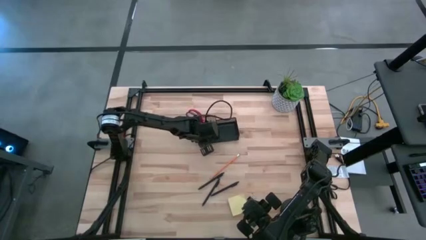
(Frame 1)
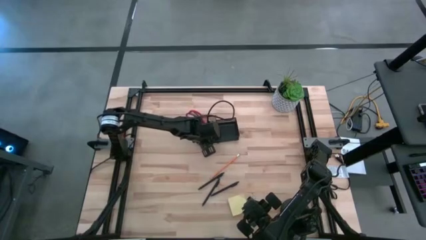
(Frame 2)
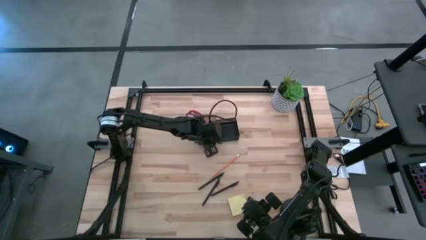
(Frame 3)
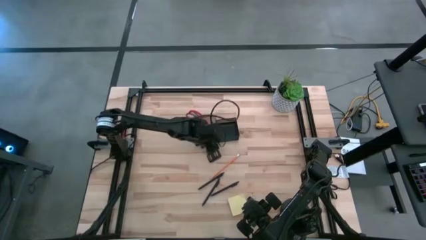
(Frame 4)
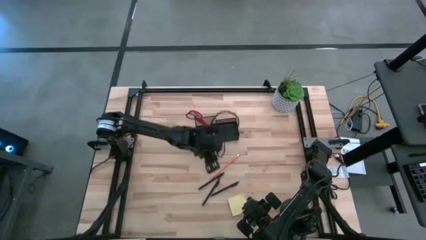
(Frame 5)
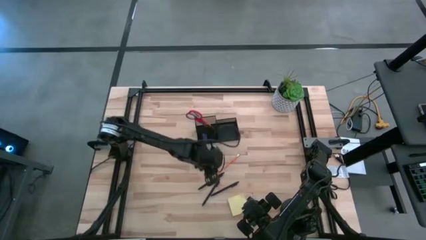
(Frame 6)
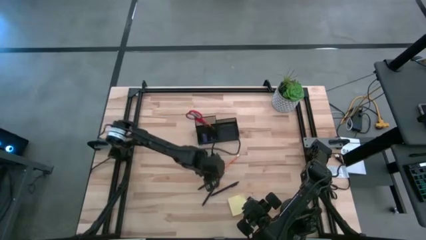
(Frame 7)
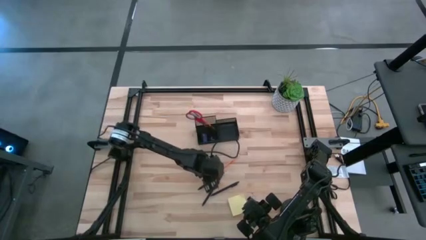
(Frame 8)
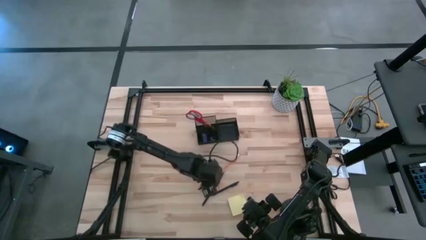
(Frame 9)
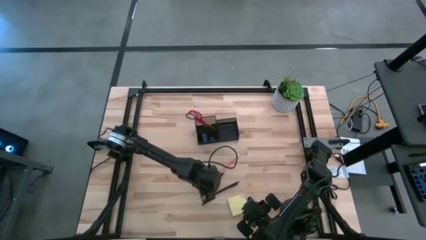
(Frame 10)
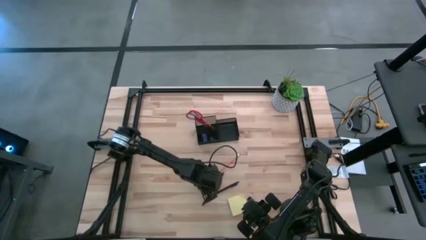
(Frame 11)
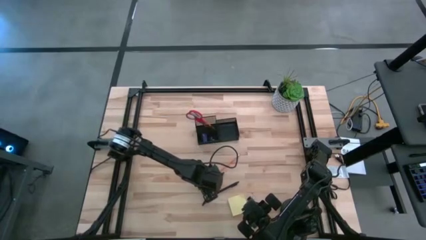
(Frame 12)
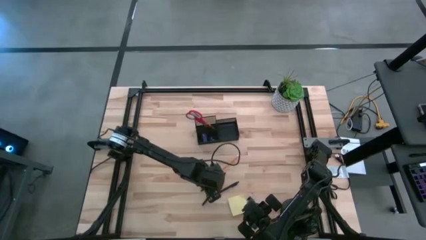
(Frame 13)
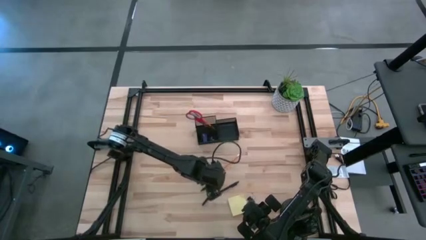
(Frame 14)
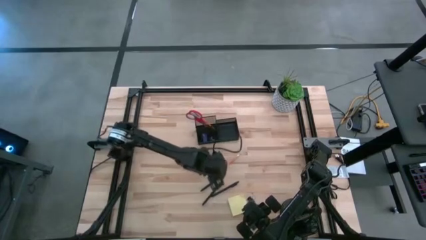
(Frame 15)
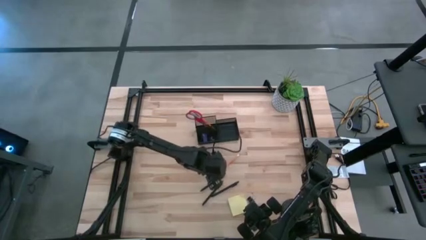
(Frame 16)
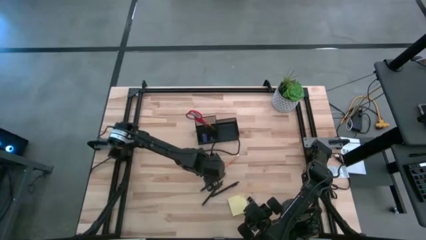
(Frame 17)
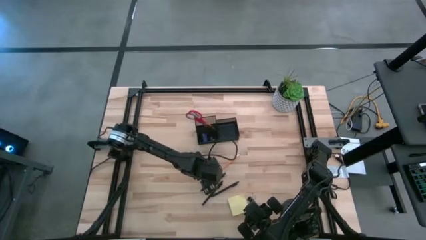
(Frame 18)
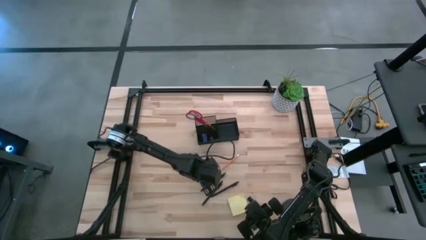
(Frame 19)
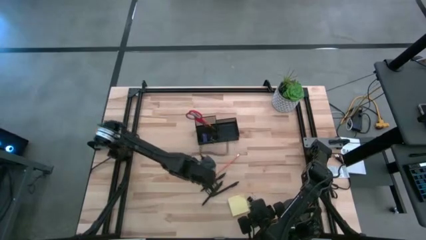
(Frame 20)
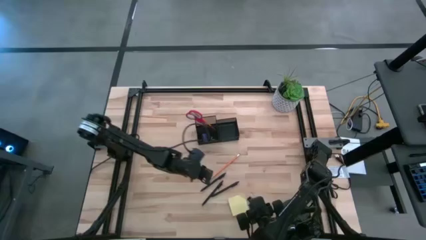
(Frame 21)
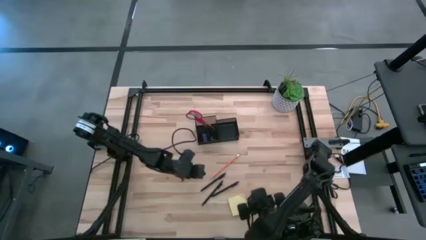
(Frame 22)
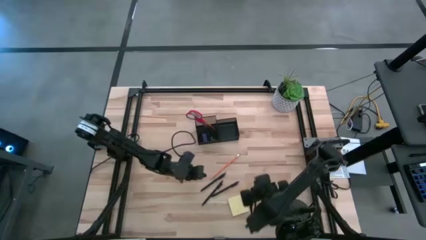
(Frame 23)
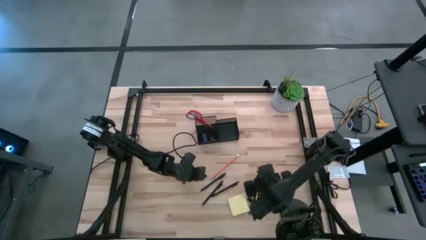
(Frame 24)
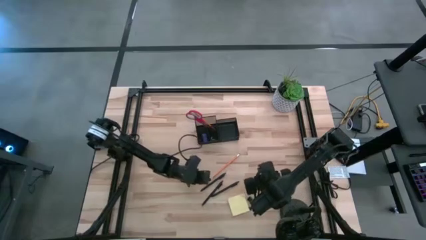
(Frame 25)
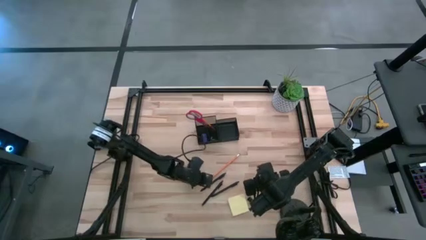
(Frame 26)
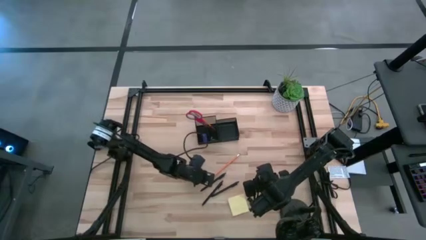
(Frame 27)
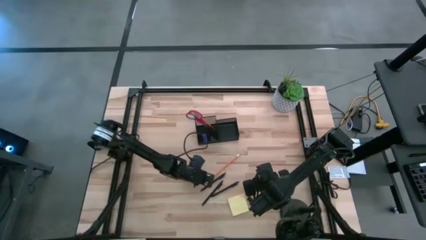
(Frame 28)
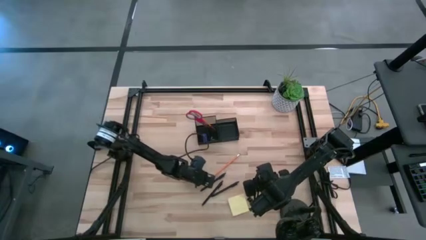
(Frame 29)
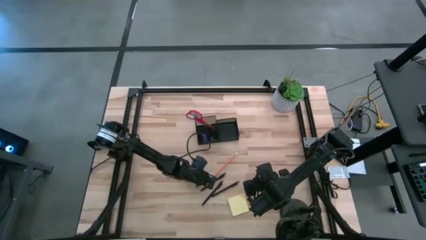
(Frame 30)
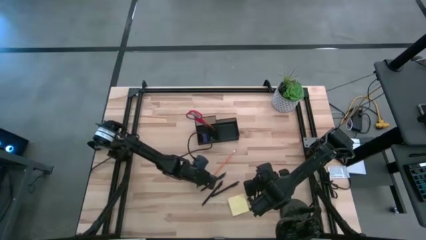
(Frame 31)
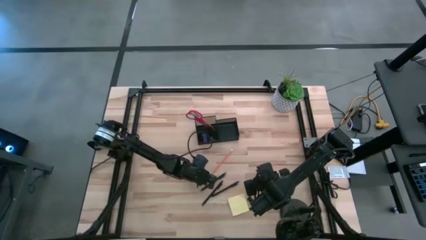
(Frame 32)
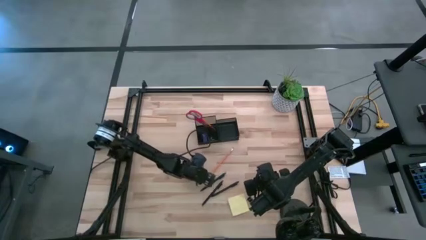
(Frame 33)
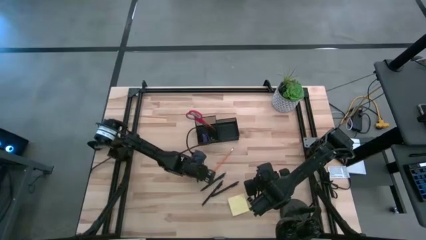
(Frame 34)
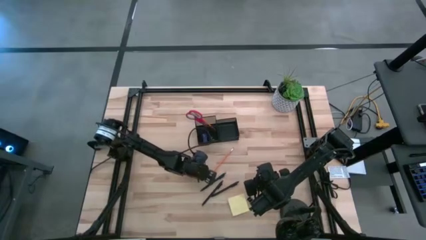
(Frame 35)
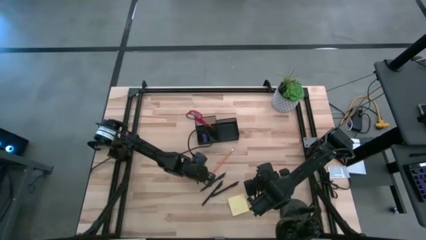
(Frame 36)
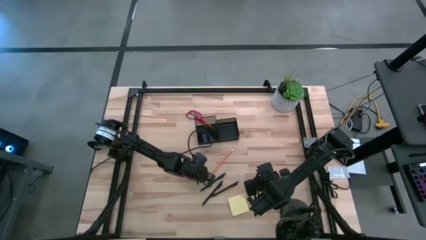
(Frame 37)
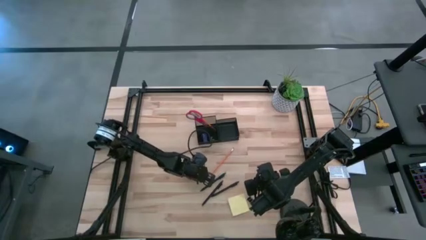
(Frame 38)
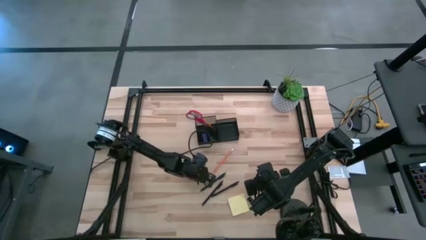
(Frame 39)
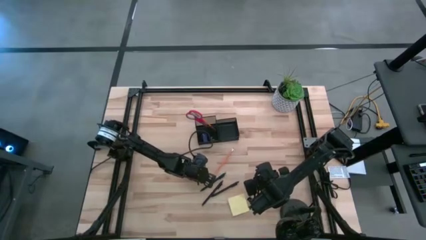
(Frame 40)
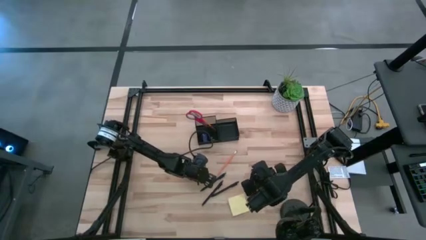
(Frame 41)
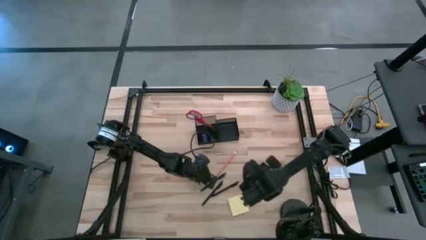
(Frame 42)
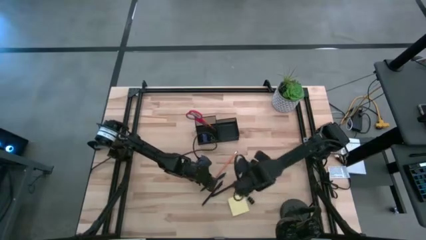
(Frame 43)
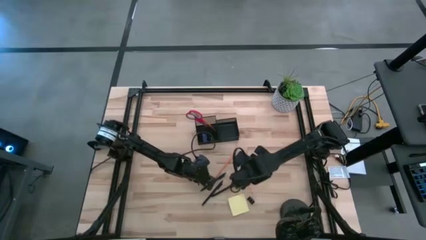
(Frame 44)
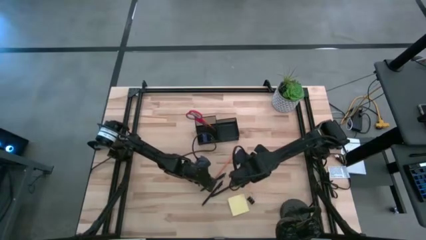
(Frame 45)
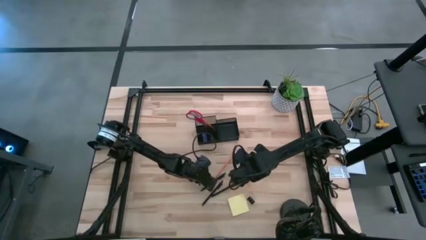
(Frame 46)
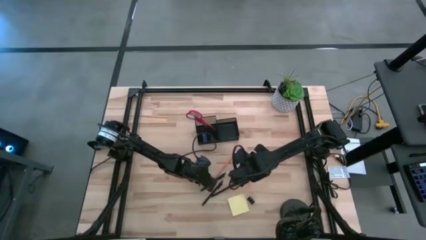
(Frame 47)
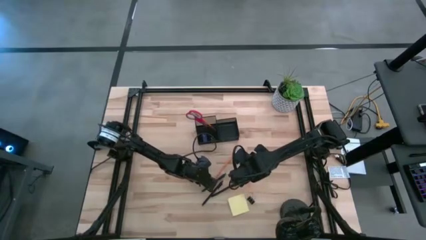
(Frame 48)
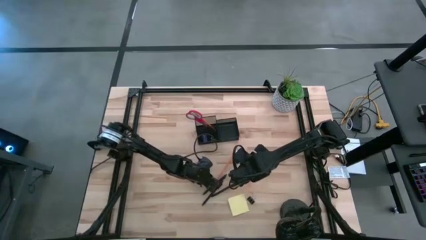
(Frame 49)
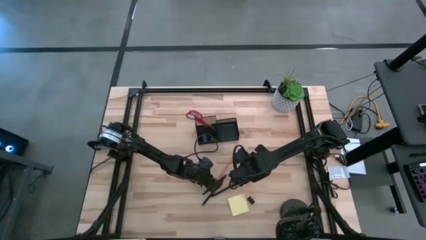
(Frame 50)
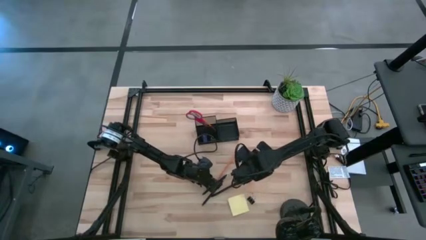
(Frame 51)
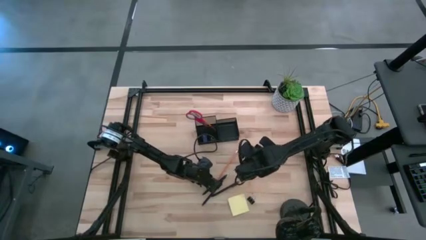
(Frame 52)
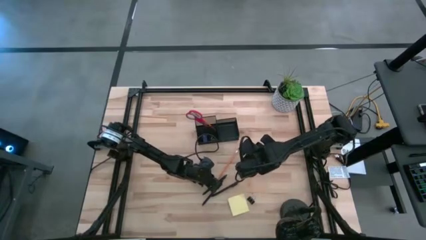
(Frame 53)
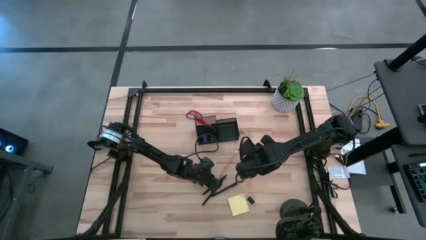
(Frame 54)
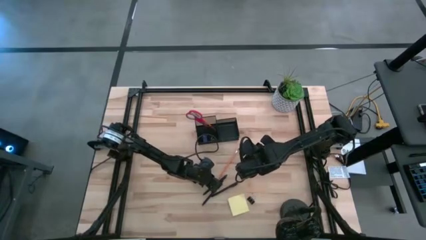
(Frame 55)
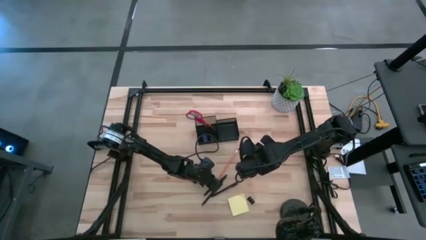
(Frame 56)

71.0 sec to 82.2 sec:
Task: Pick and place office supplies into organizer
Put the pencil into the top left section of the desk organizer

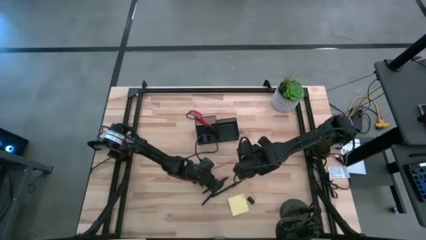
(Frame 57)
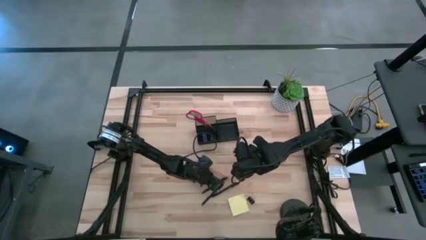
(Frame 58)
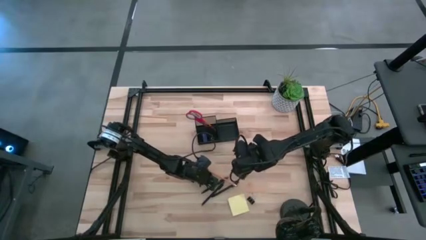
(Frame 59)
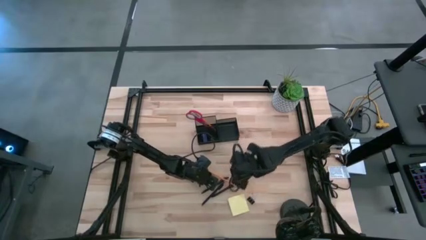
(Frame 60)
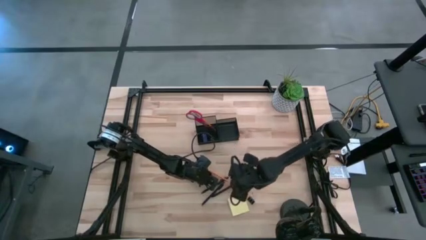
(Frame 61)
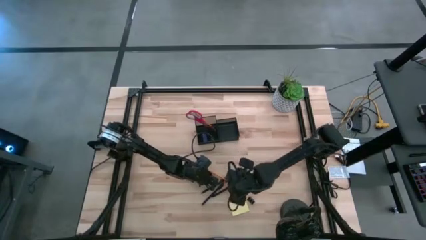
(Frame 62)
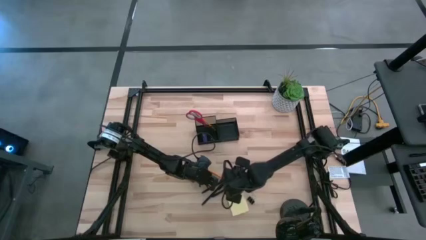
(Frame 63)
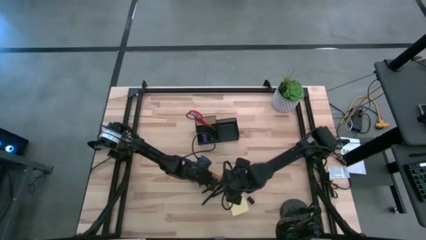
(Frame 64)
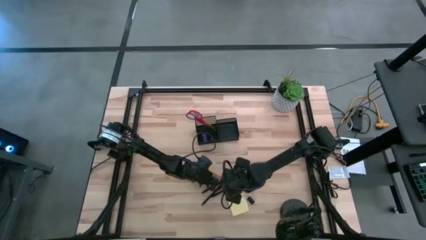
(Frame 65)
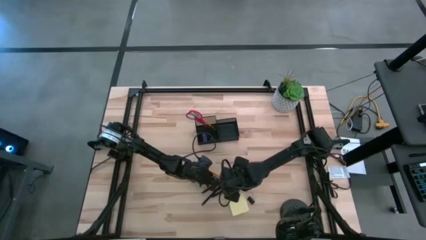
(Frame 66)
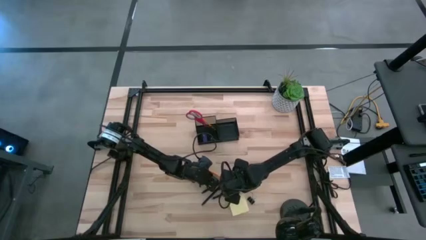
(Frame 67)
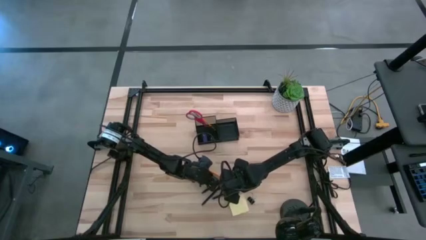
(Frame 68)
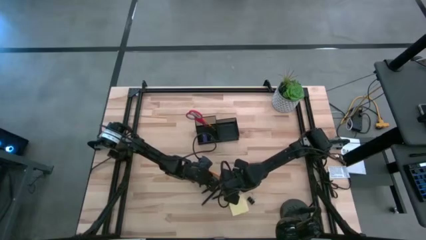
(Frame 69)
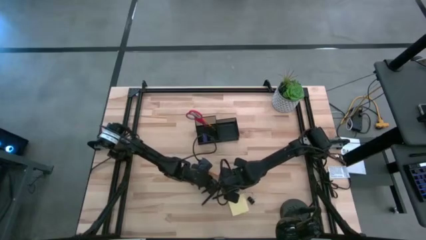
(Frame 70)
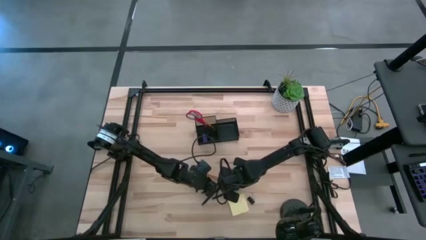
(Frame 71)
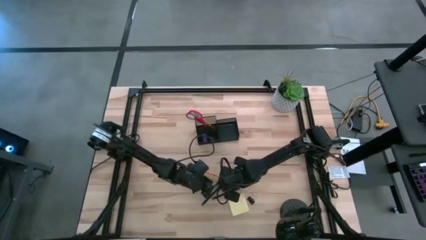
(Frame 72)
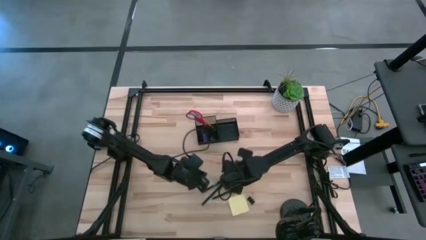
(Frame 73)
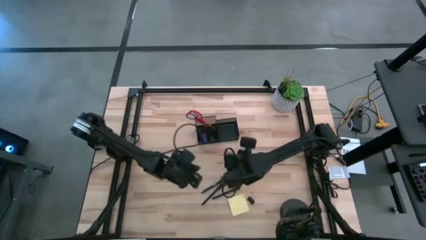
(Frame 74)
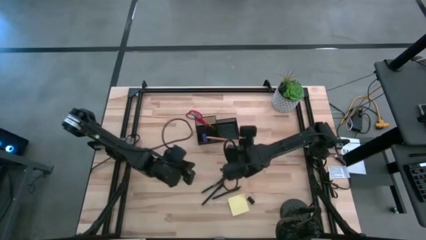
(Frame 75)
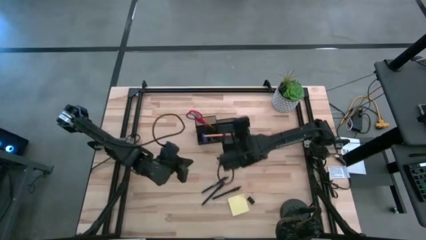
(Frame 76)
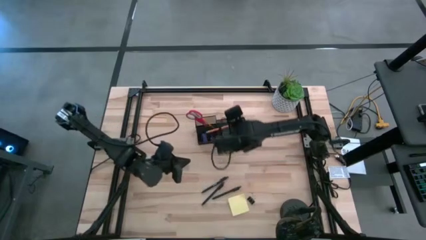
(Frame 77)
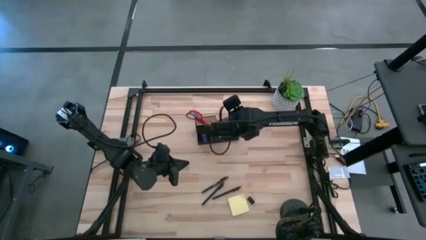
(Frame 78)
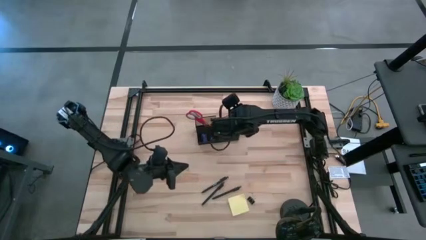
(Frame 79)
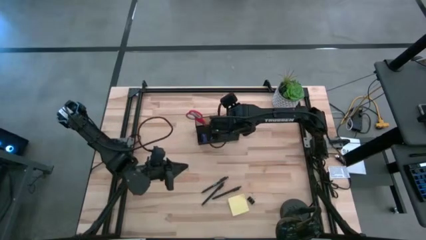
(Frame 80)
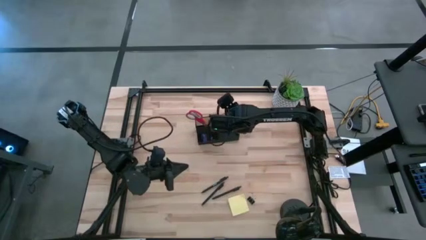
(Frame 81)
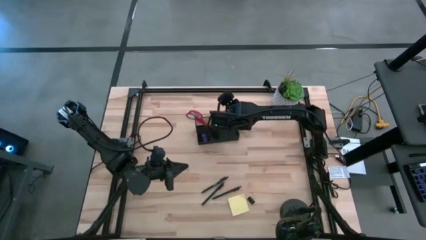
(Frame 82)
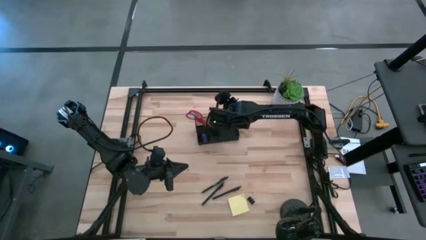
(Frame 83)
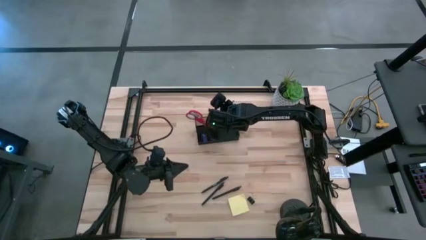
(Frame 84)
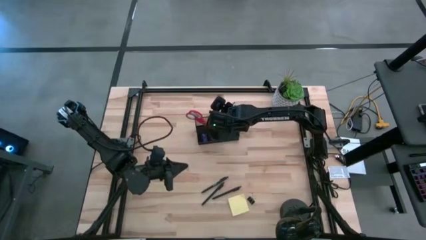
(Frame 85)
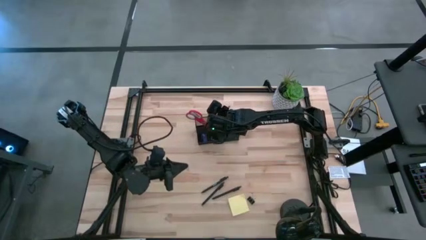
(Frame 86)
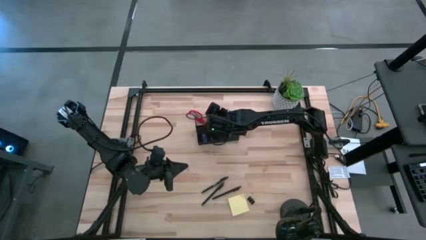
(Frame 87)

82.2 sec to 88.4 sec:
Put the pencil into the top left section of the desk organizer
